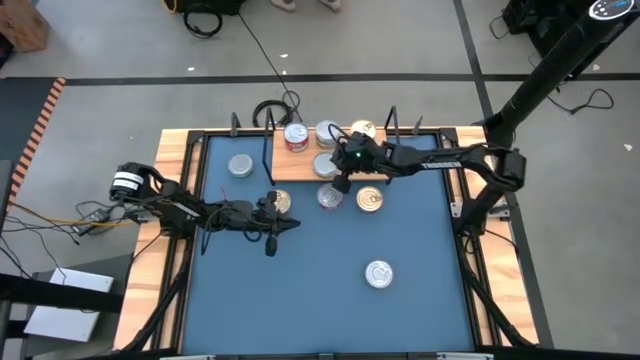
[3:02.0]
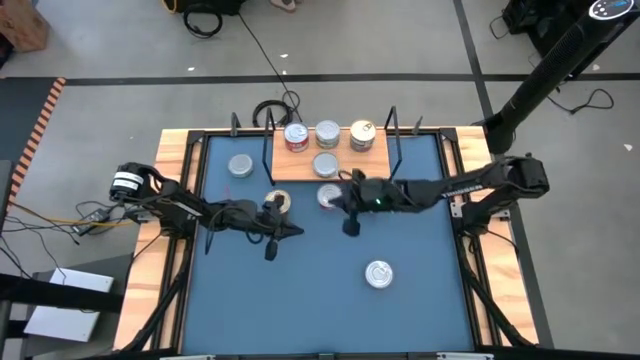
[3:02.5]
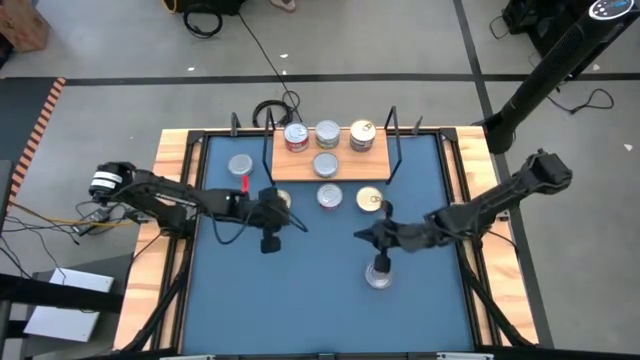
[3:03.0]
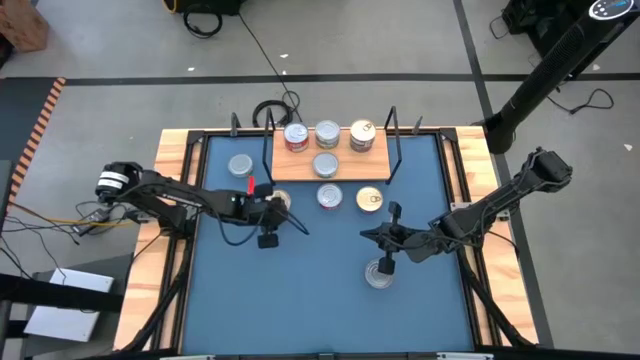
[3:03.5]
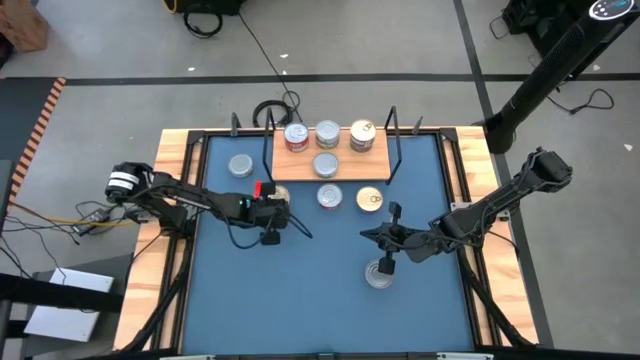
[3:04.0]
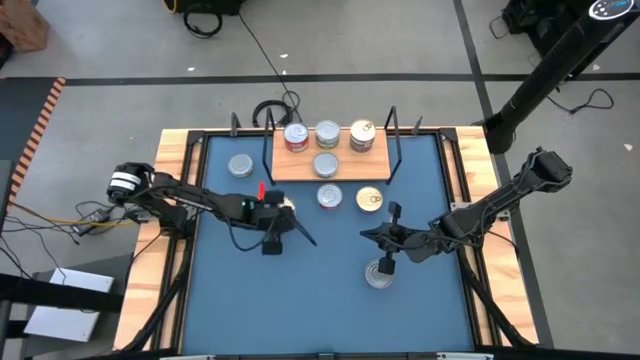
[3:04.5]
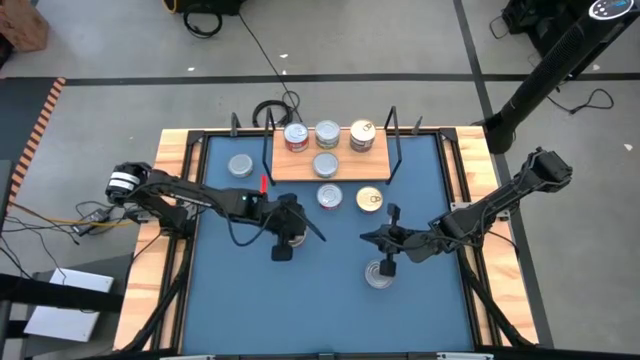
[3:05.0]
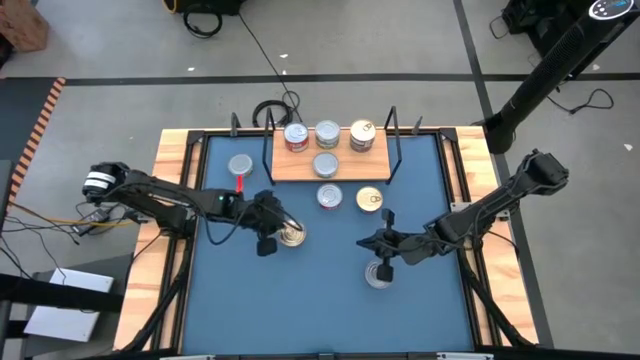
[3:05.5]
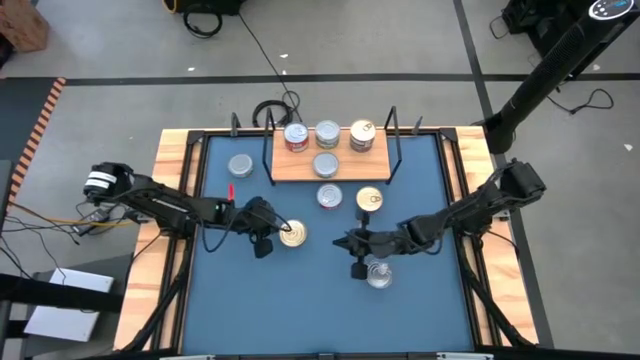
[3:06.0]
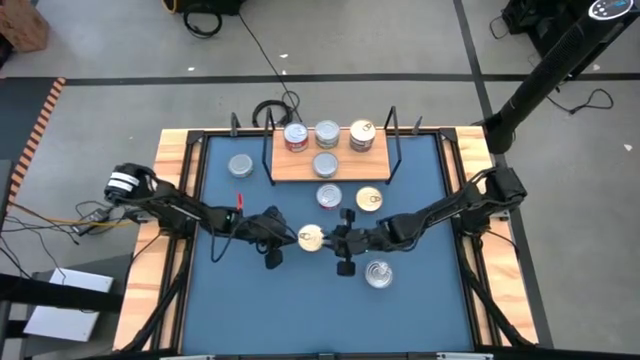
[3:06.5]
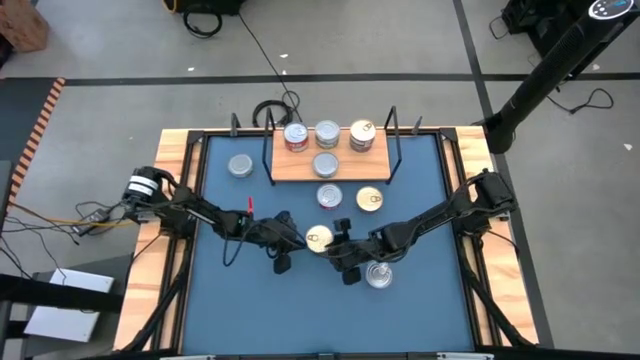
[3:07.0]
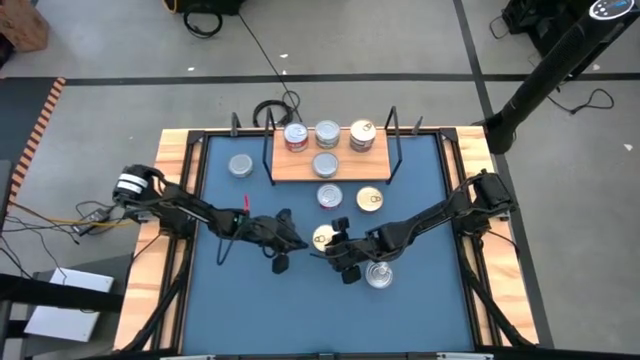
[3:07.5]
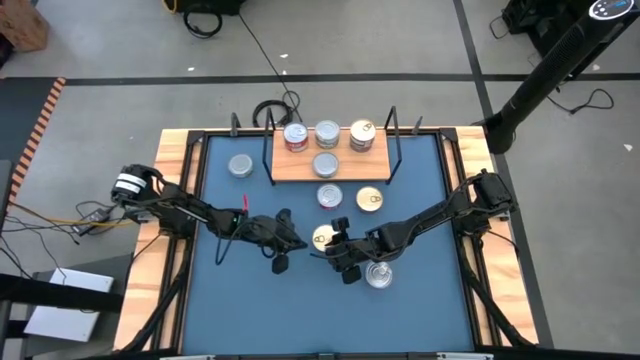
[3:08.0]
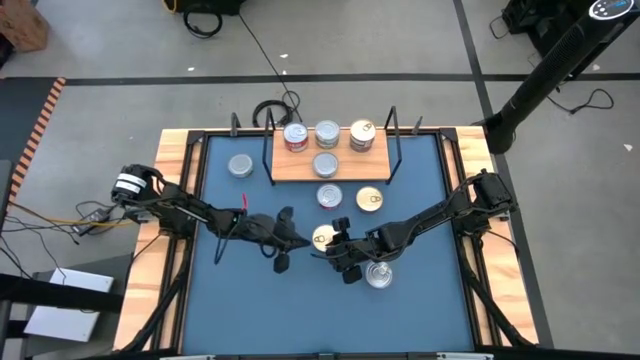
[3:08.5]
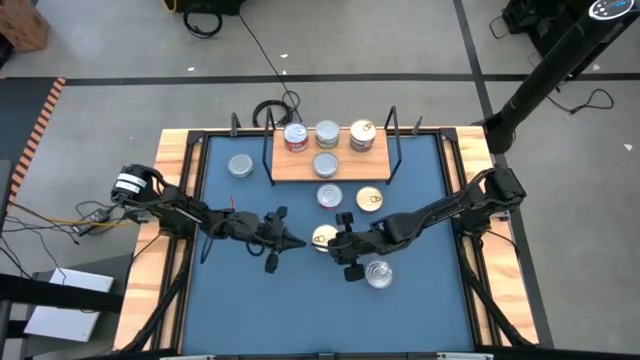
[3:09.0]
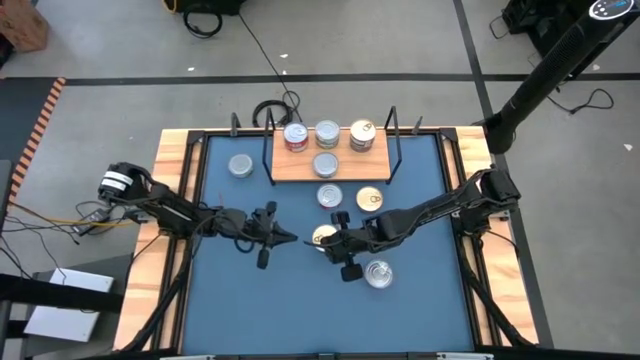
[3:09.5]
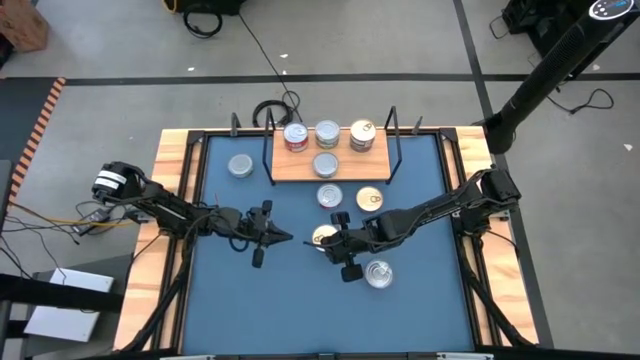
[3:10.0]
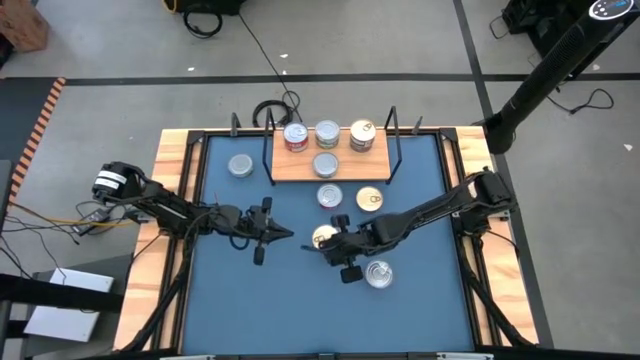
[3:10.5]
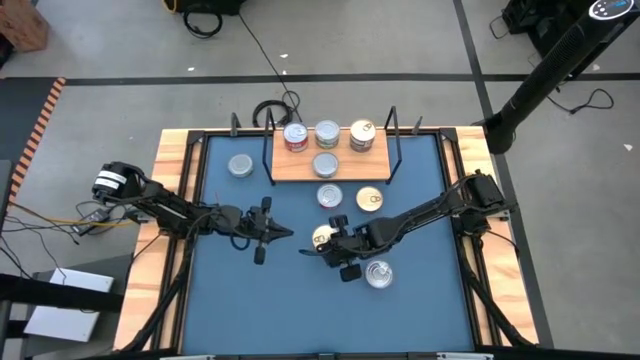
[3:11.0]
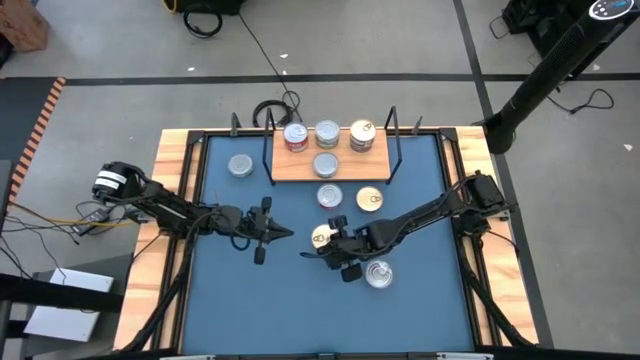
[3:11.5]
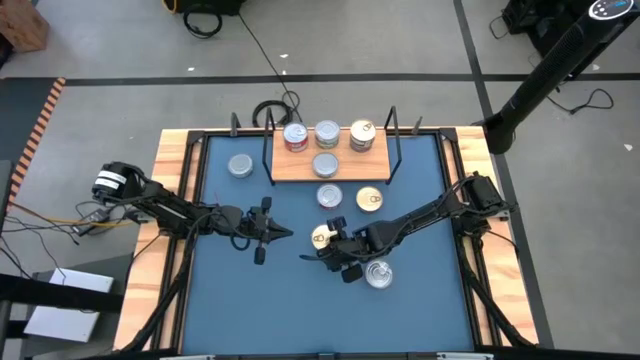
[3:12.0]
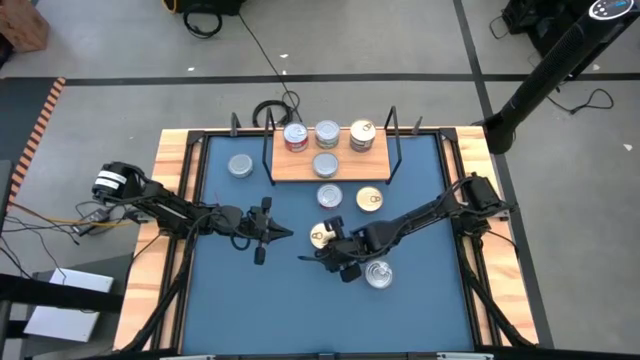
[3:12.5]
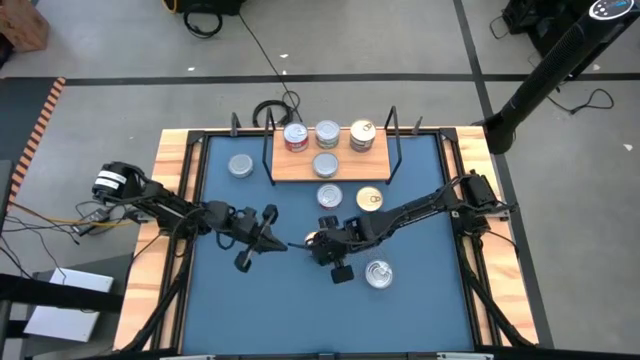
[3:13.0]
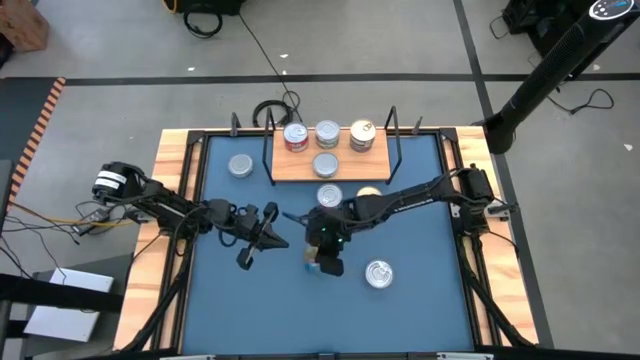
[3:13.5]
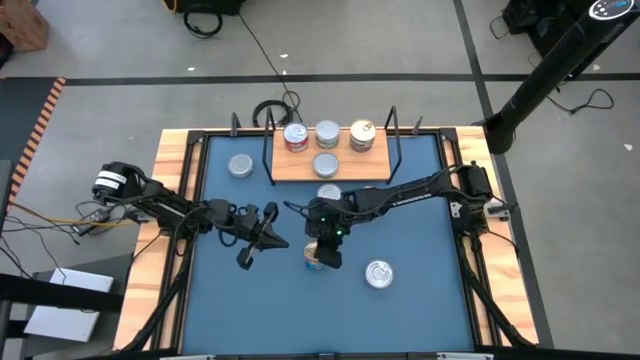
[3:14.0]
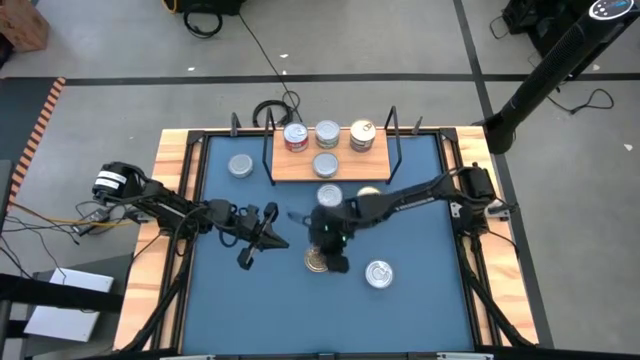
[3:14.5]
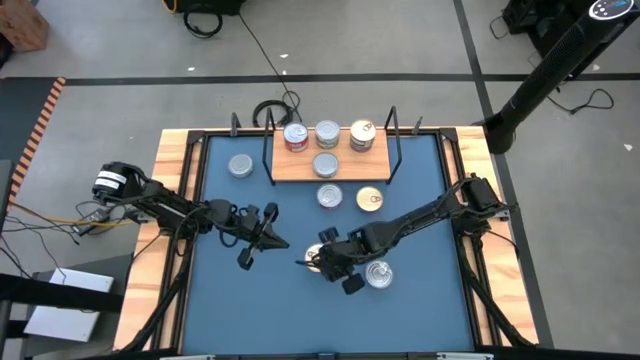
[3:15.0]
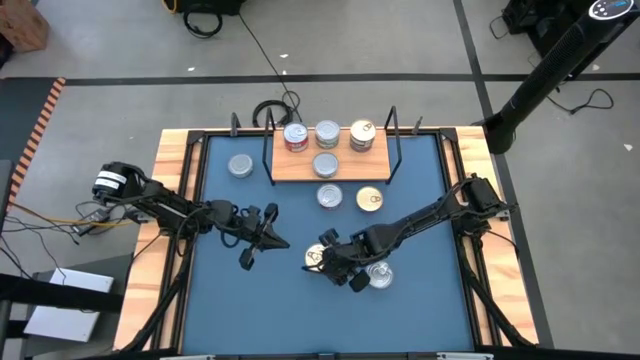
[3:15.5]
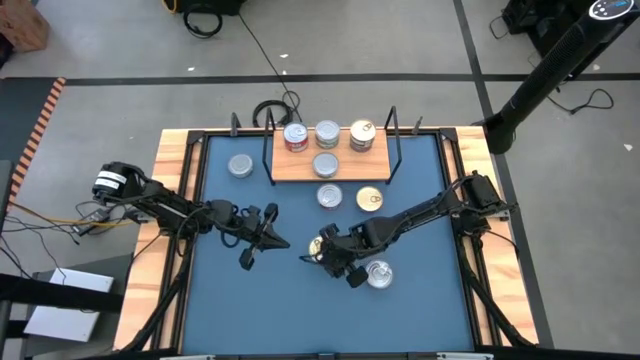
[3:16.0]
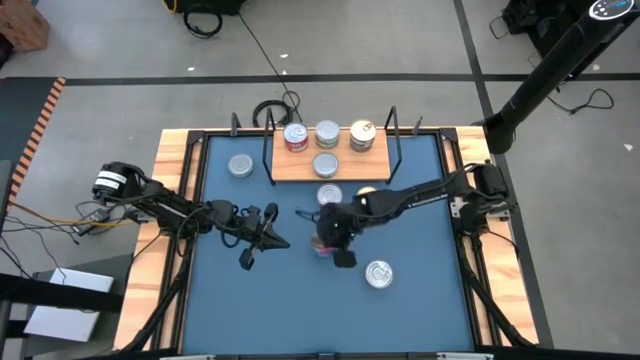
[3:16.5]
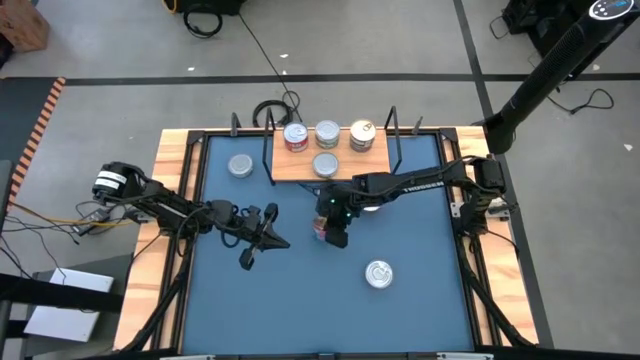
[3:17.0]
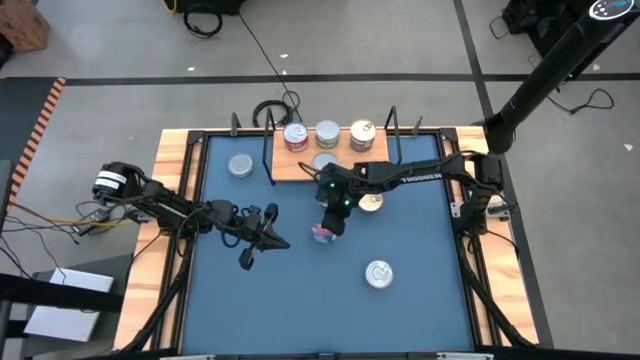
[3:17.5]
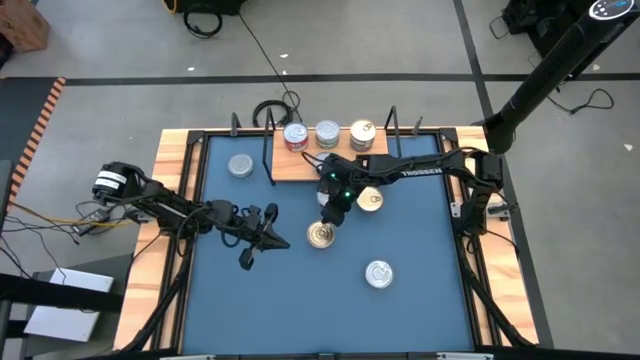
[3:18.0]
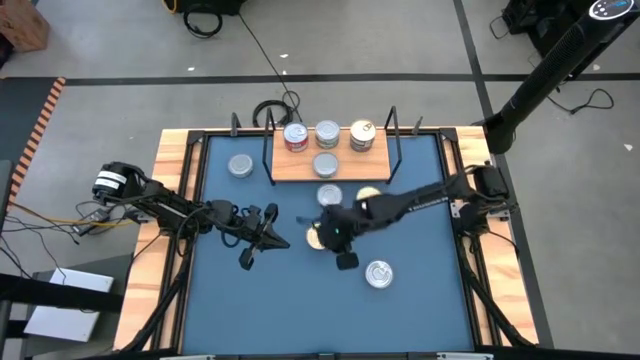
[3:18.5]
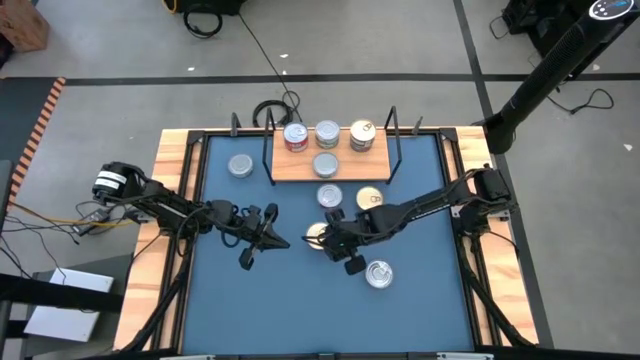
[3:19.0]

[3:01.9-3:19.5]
Task: Stack canned seafood by type on shelf
Put the blue tuna can aligned with the stacked blue tuna can on the shelf
